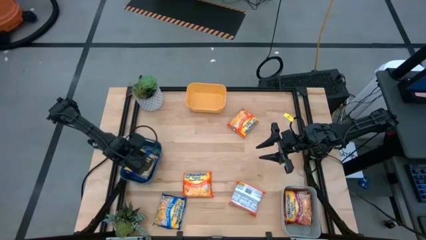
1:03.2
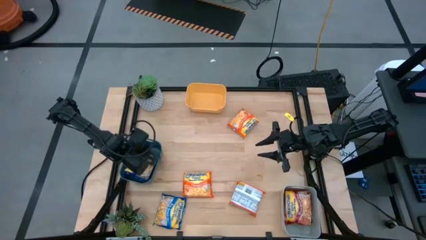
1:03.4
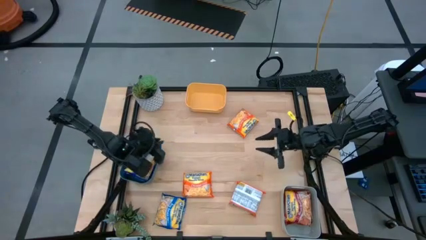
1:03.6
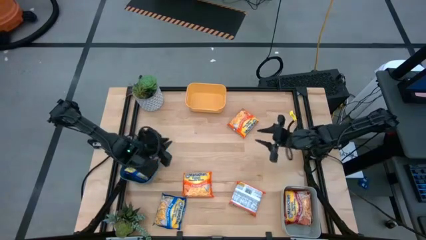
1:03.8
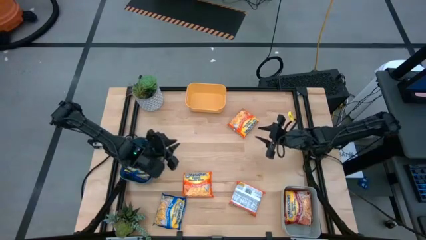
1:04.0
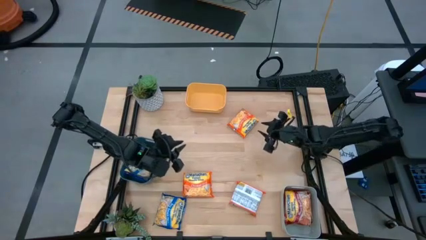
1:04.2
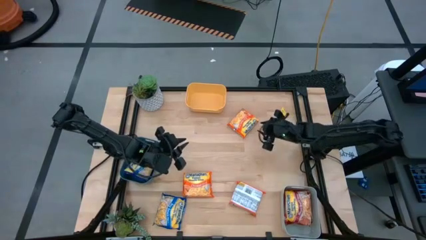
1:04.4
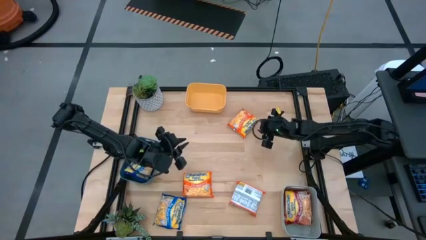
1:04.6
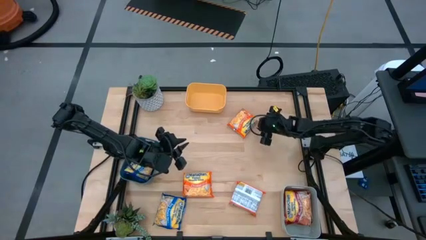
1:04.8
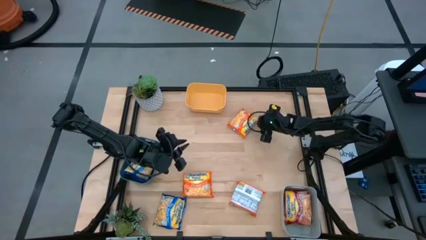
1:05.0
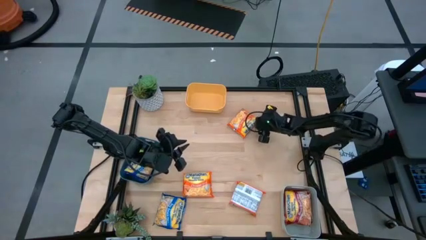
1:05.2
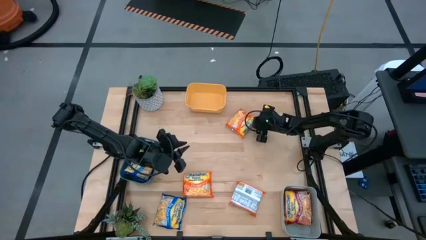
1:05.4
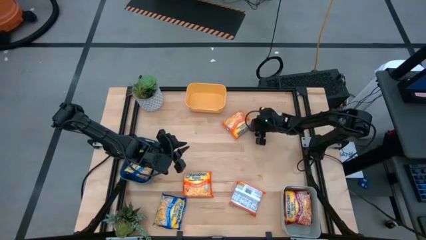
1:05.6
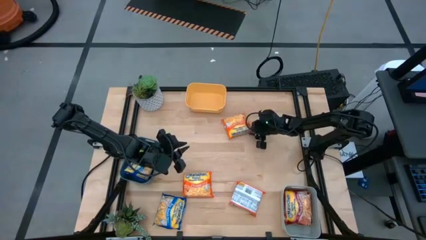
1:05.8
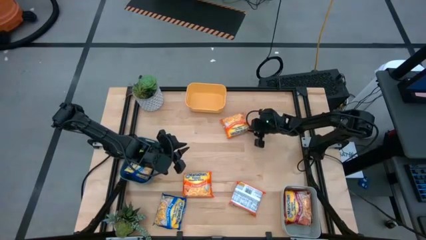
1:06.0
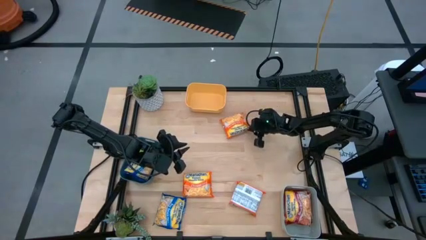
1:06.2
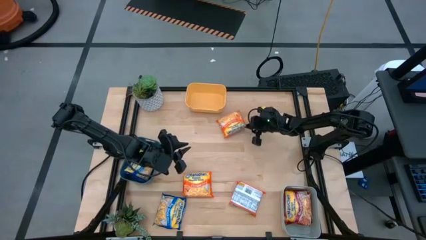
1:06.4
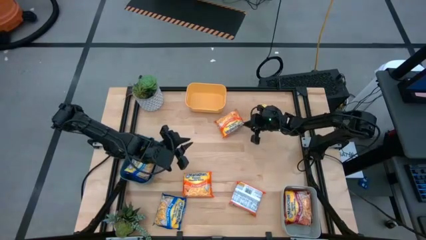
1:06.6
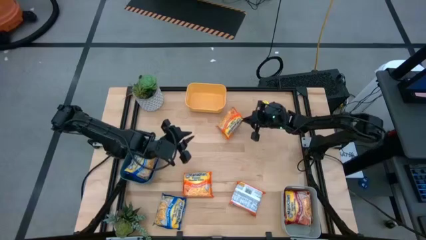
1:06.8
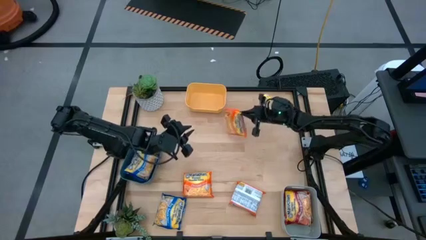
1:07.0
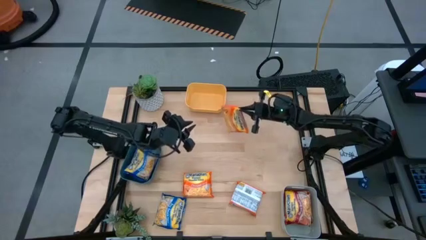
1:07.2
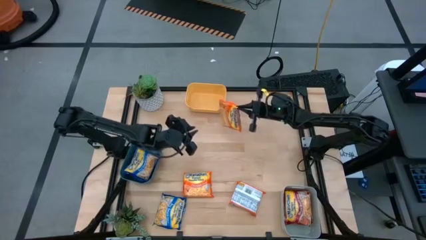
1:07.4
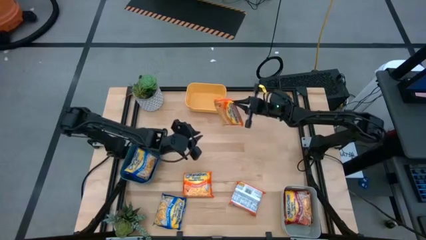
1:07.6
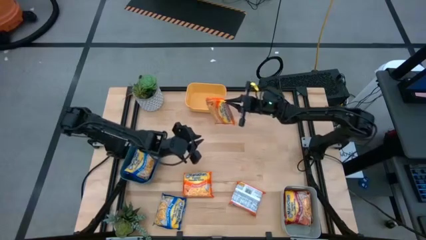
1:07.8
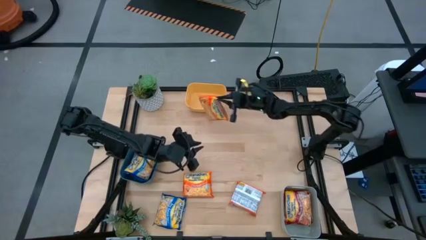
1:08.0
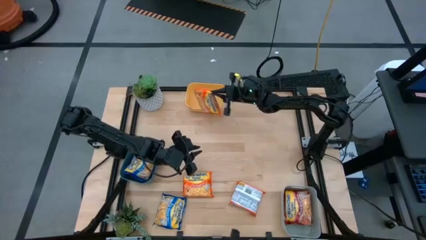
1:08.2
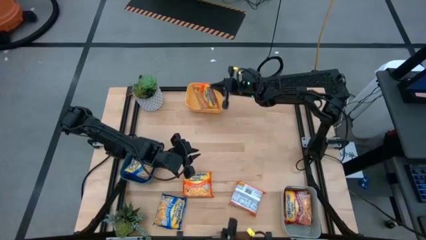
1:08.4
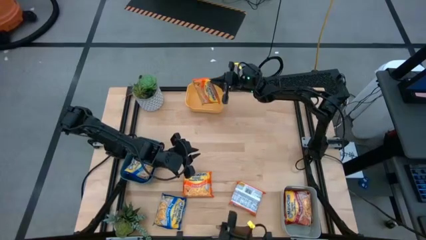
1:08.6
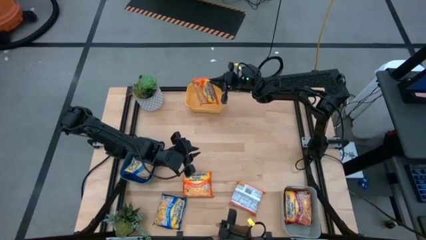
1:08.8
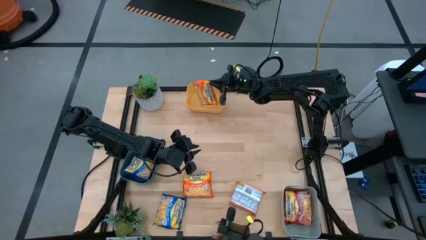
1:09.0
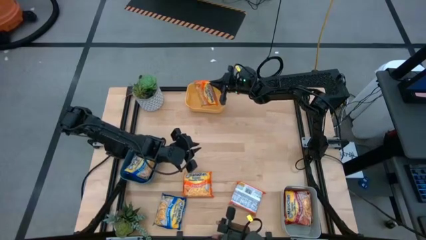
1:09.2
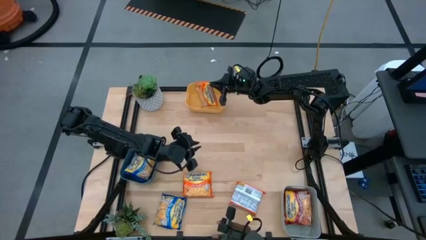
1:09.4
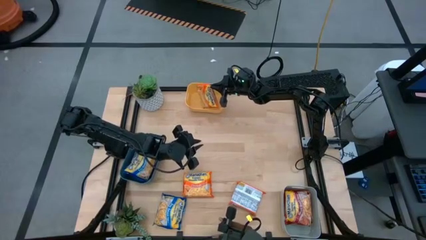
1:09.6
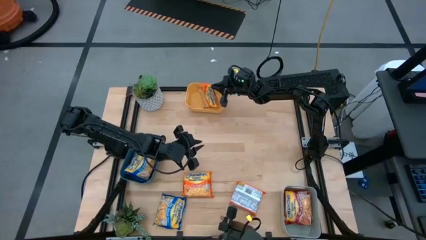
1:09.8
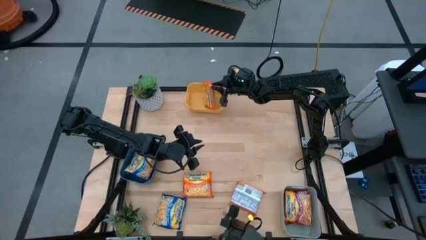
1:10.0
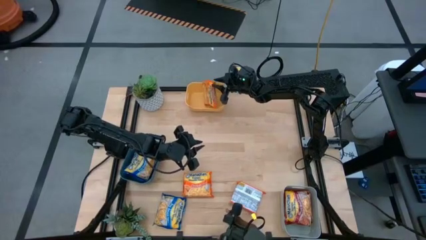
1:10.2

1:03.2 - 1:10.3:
Task: Sort Maruchan noodles
Put the top orange noodle pack into the yellow bin

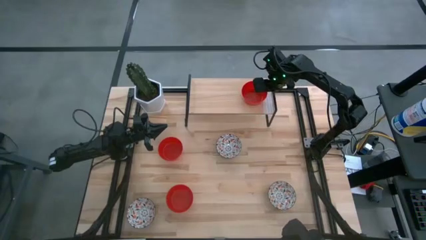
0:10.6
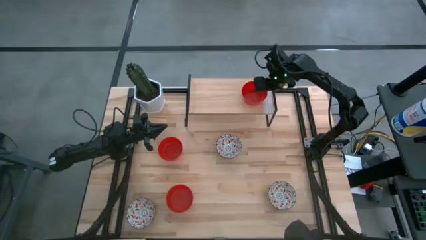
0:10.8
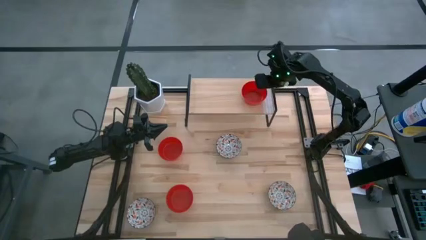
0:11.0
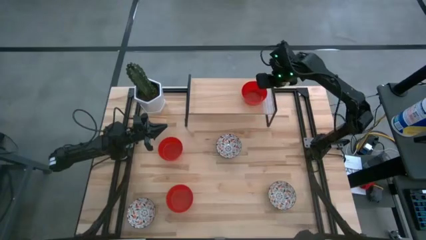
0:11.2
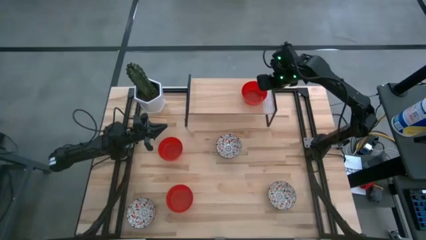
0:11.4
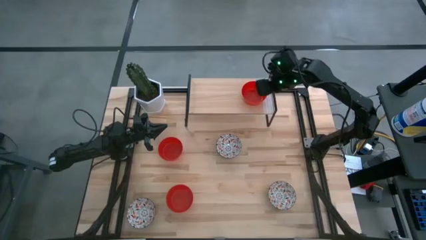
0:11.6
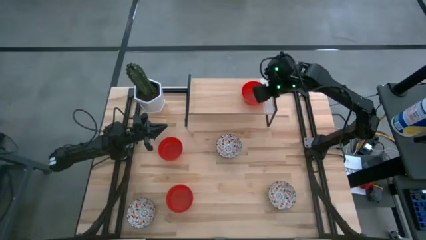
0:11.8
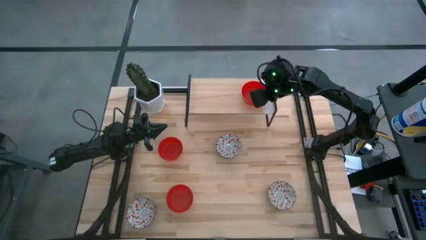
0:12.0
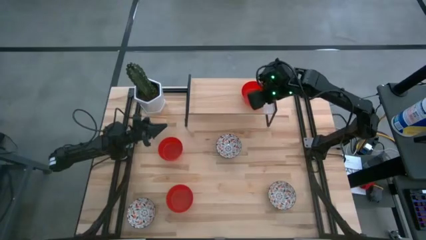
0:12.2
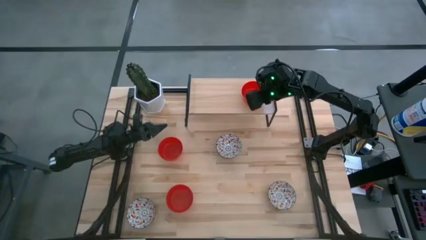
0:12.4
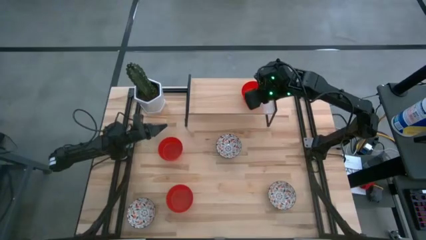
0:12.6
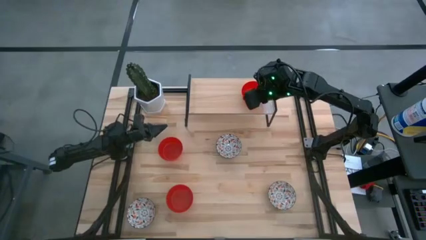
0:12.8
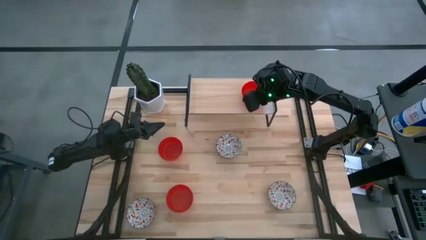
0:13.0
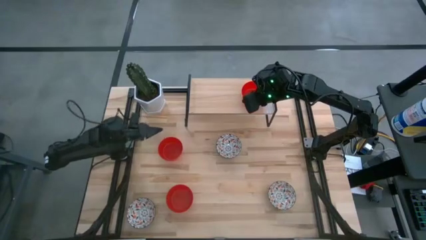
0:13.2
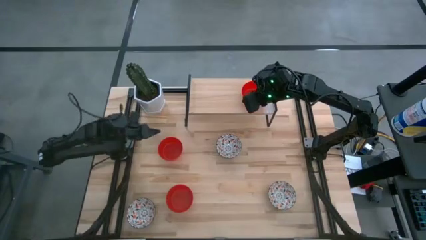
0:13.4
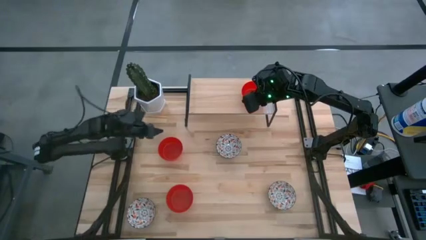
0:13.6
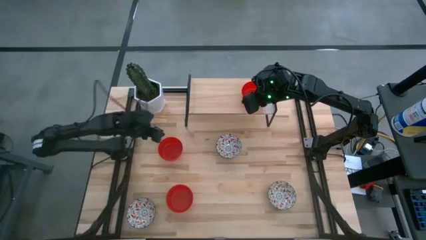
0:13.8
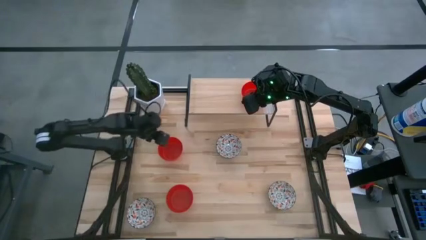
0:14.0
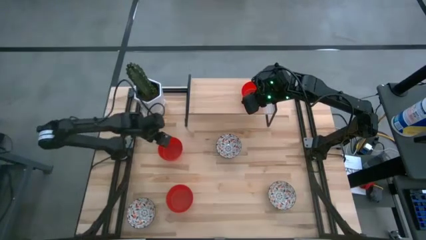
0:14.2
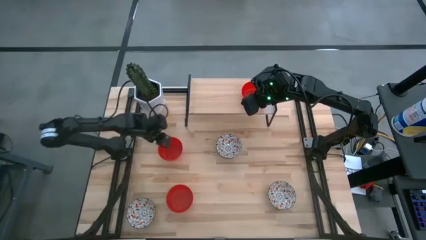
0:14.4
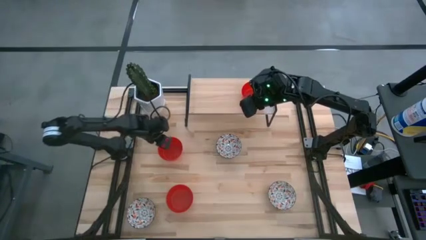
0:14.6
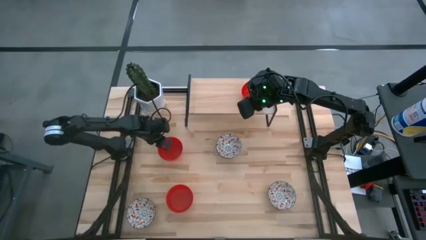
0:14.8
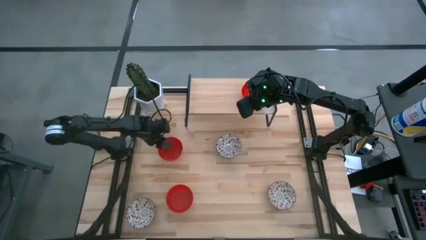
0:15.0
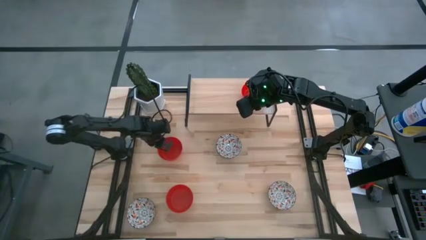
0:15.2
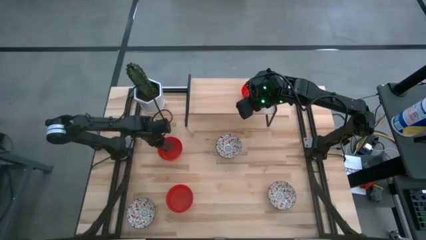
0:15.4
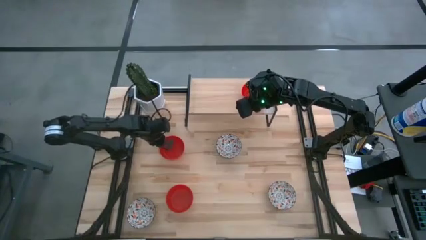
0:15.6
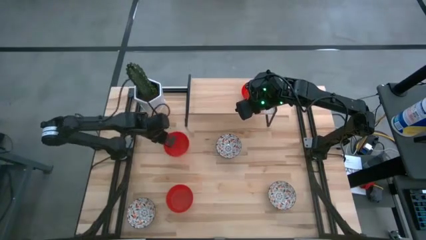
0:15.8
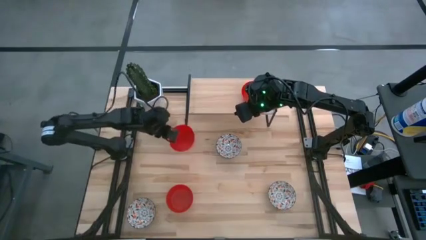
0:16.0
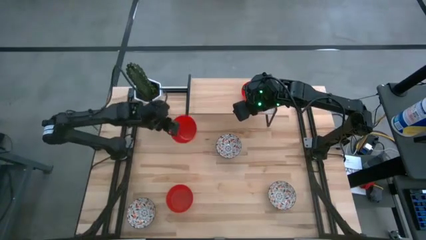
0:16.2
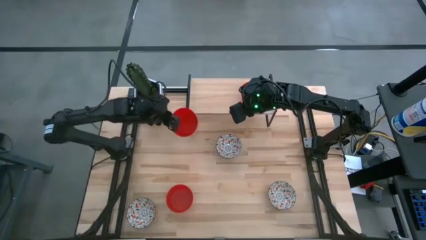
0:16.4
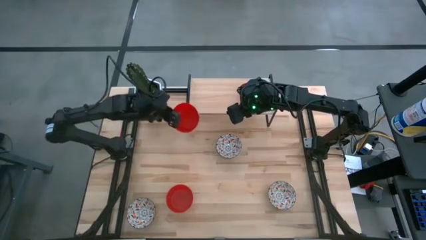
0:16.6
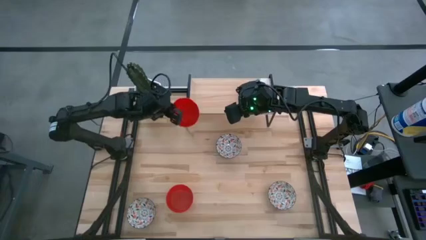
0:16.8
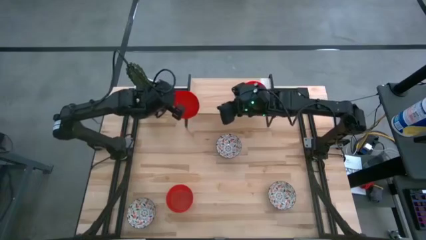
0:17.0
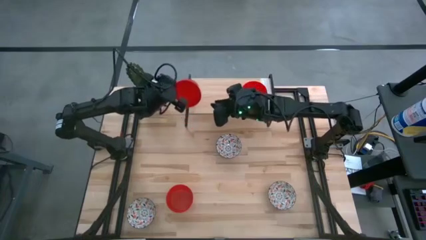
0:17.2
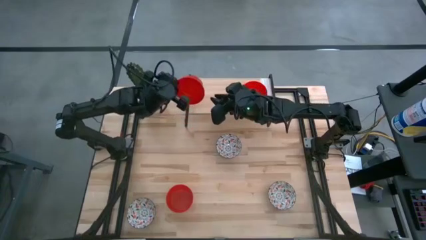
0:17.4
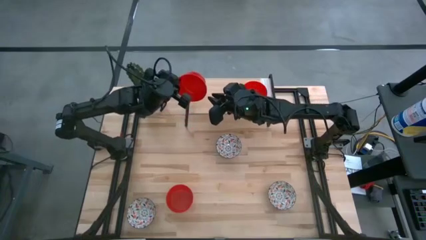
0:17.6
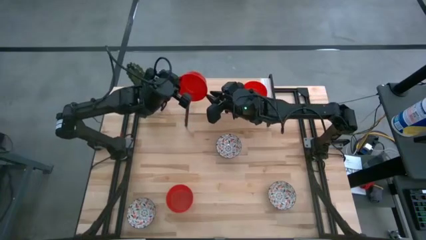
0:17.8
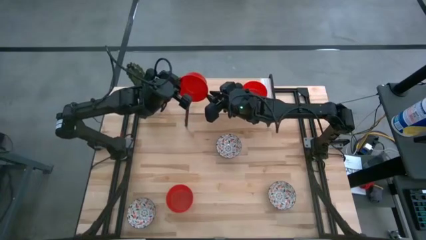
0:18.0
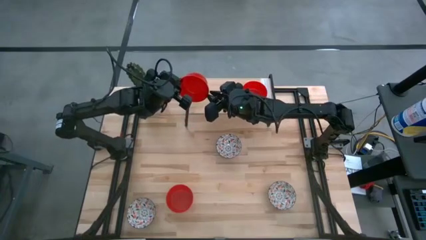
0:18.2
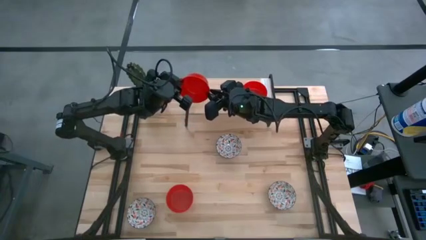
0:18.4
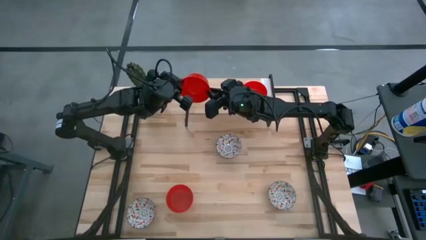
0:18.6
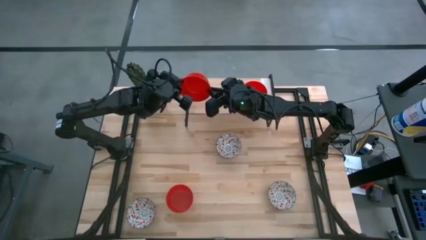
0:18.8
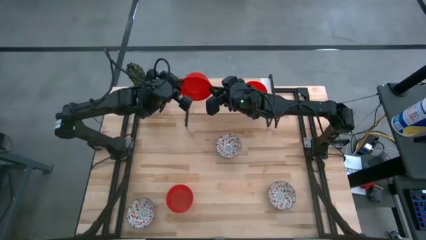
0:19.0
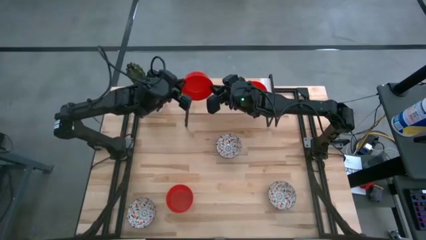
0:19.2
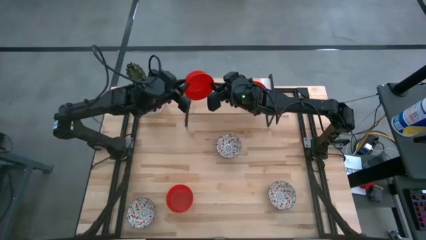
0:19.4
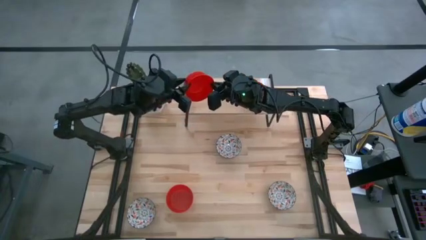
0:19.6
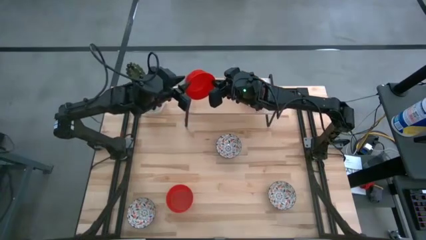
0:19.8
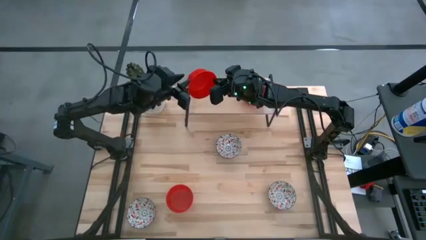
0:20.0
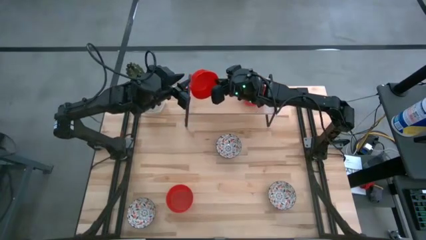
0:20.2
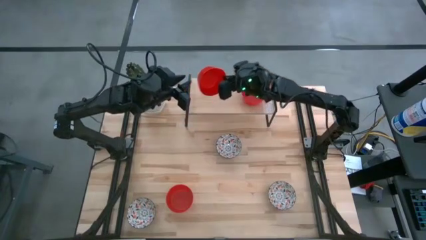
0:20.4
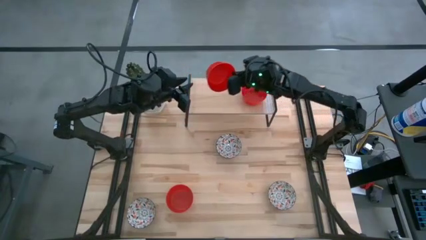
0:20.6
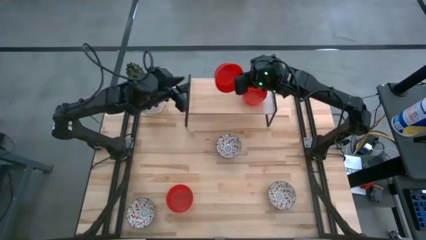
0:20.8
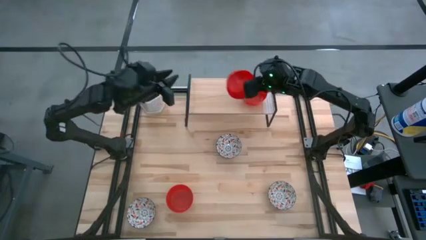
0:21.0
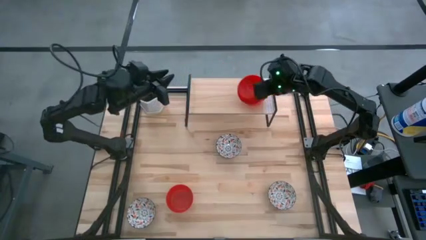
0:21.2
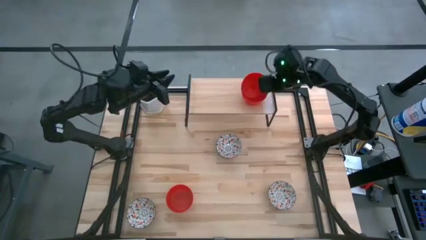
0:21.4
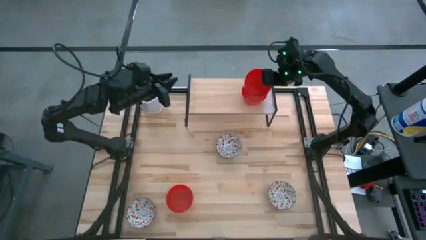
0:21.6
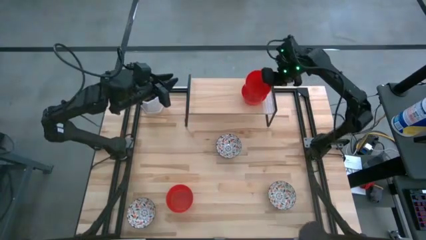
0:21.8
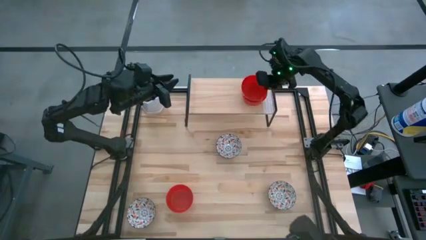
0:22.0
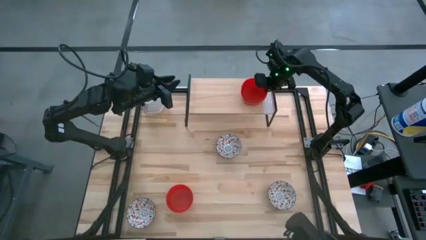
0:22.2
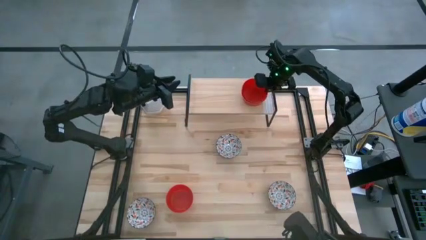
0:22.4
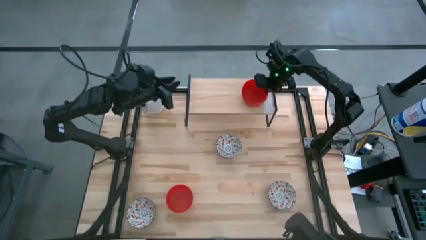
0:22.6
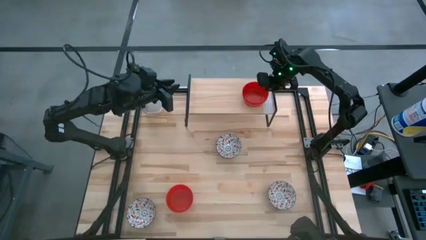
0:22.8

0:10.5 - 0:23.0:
Task: Pick & Place Mini bowls
Stack the top red bowl on the red bowl on the shelf
